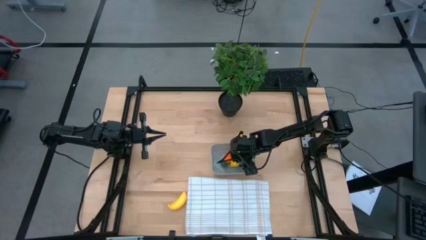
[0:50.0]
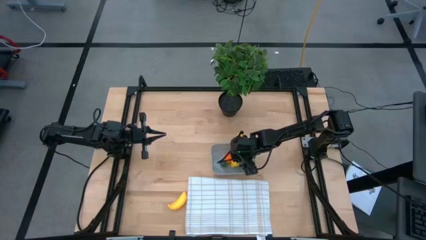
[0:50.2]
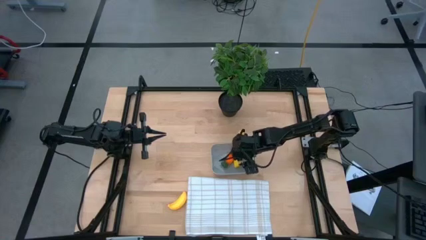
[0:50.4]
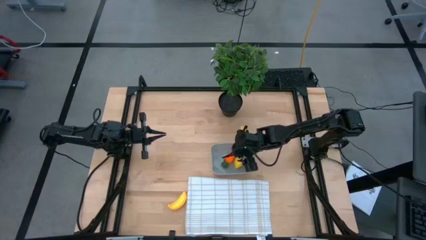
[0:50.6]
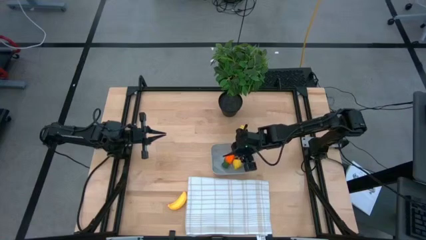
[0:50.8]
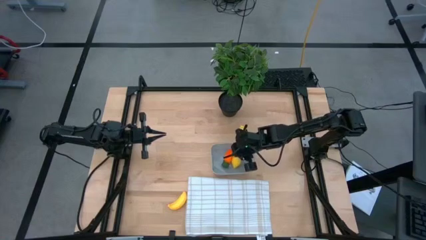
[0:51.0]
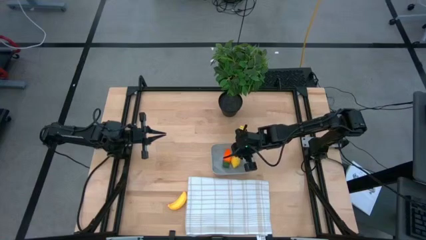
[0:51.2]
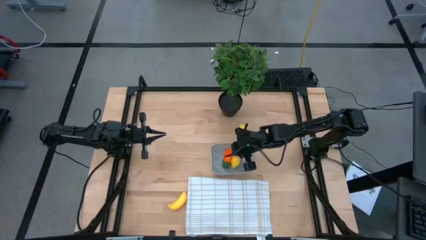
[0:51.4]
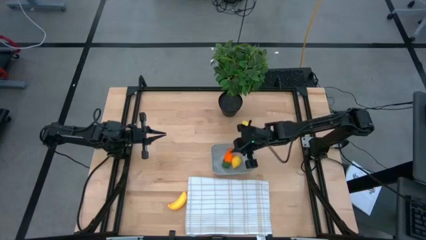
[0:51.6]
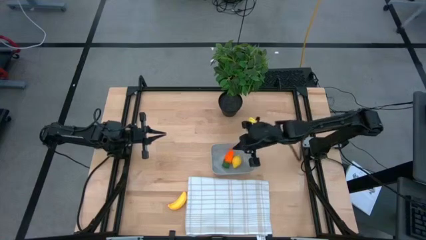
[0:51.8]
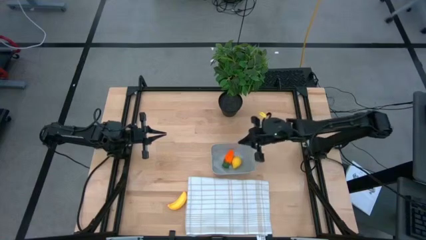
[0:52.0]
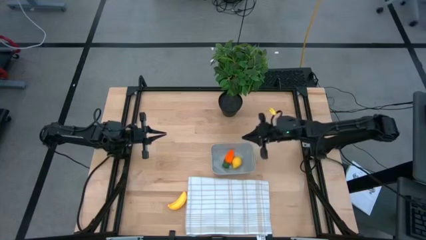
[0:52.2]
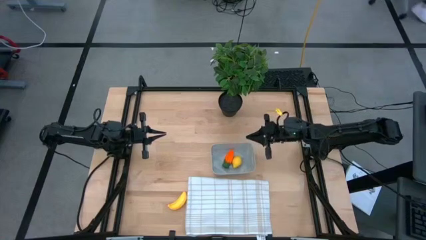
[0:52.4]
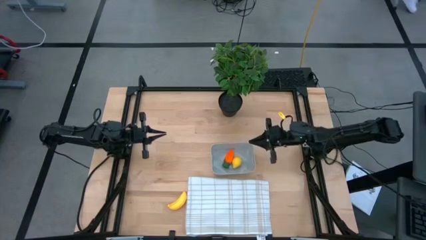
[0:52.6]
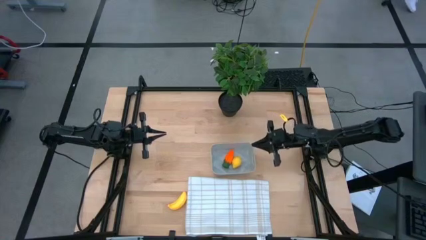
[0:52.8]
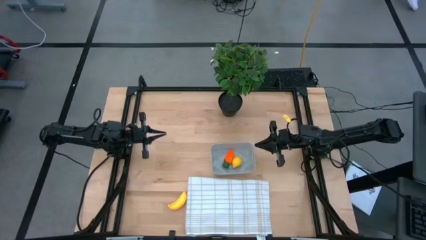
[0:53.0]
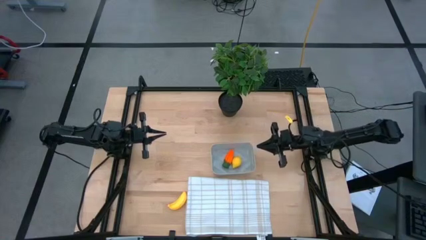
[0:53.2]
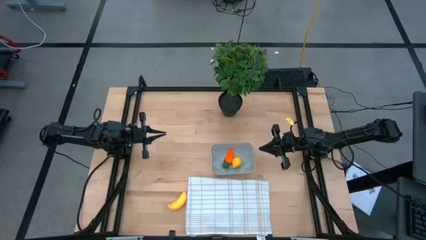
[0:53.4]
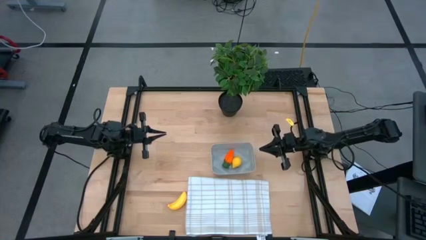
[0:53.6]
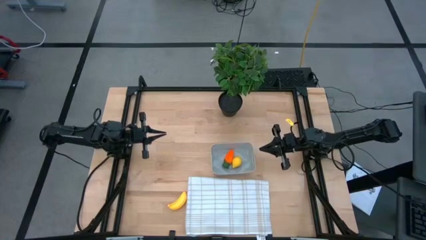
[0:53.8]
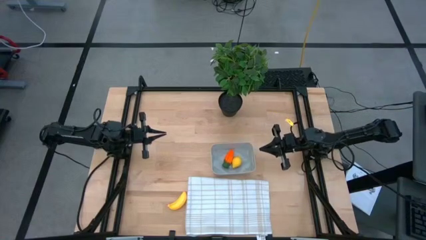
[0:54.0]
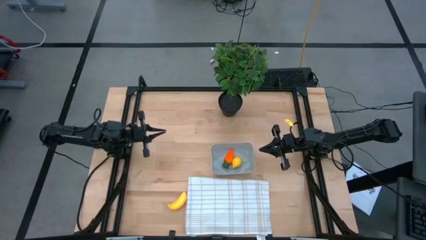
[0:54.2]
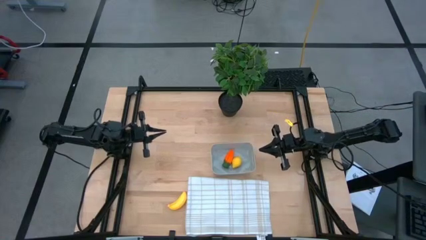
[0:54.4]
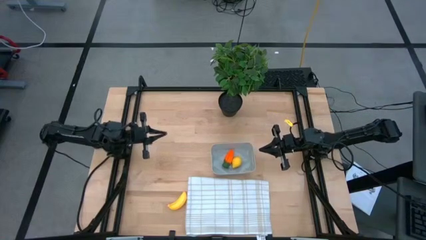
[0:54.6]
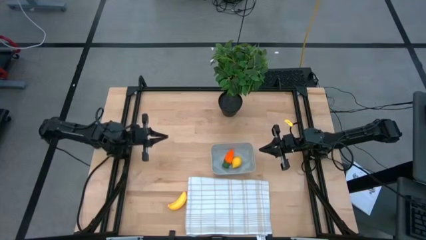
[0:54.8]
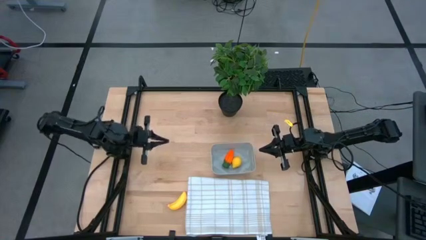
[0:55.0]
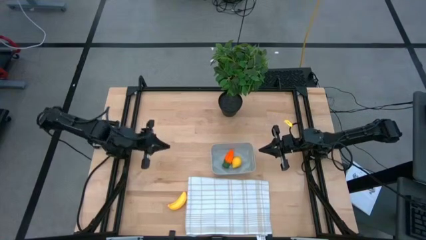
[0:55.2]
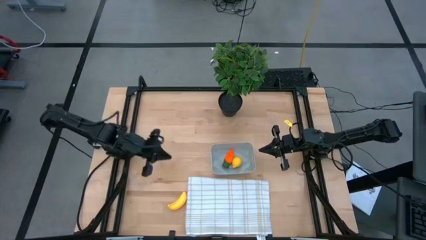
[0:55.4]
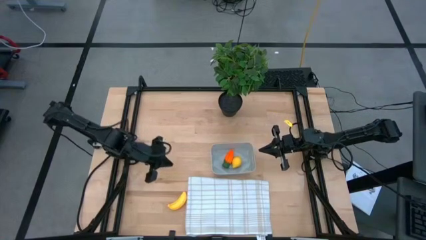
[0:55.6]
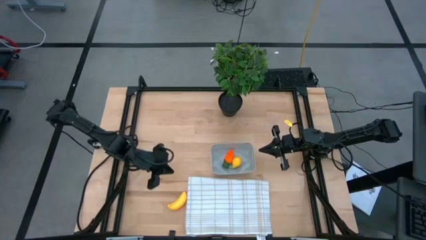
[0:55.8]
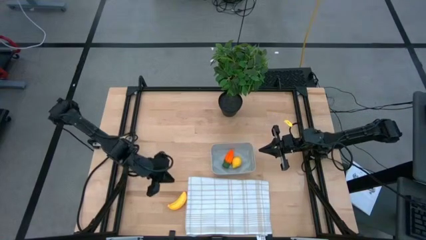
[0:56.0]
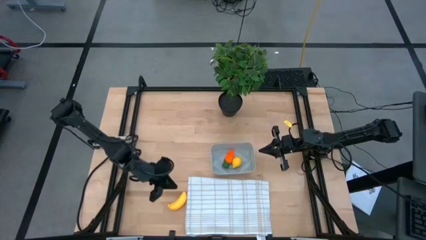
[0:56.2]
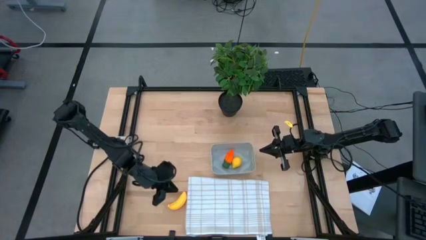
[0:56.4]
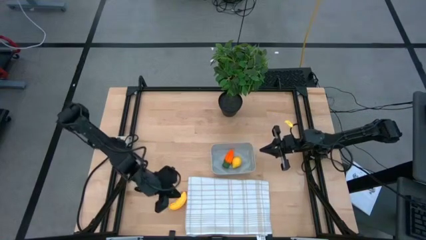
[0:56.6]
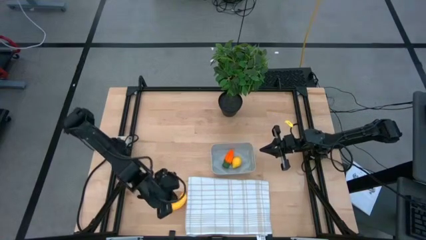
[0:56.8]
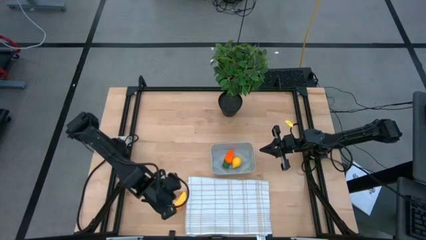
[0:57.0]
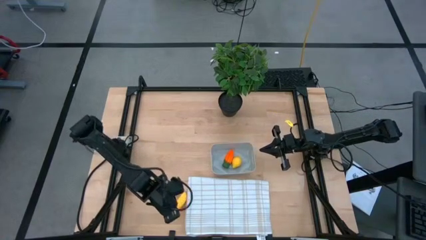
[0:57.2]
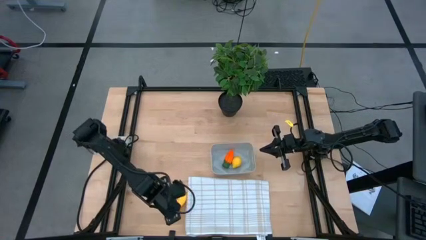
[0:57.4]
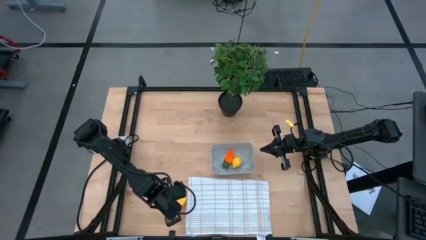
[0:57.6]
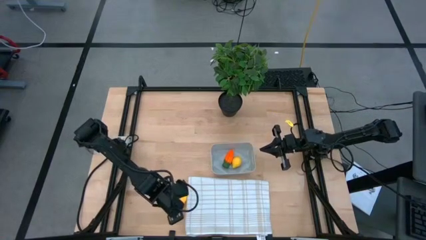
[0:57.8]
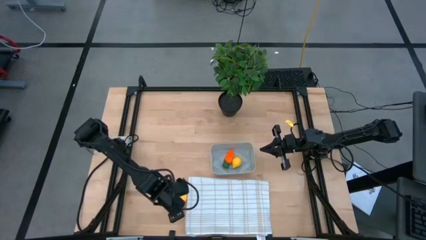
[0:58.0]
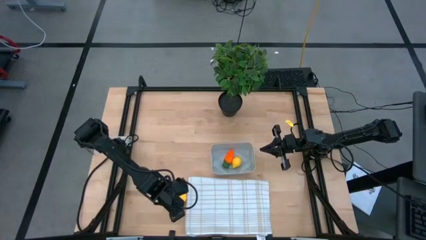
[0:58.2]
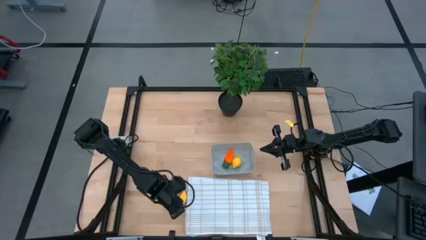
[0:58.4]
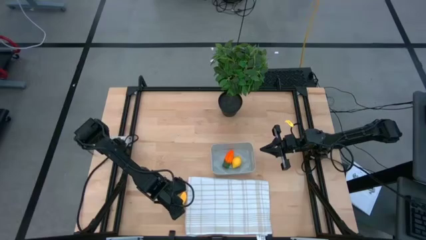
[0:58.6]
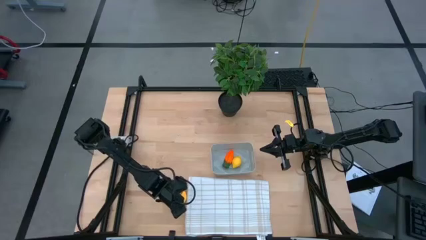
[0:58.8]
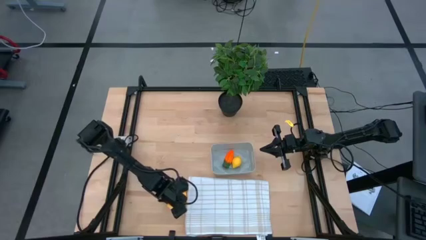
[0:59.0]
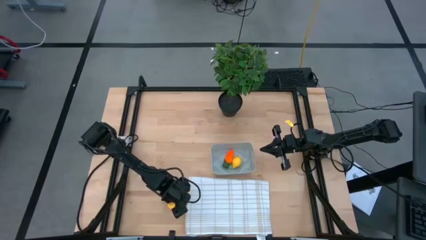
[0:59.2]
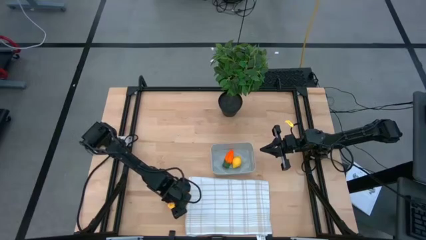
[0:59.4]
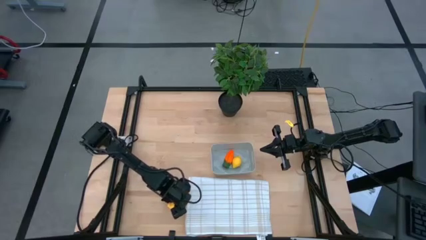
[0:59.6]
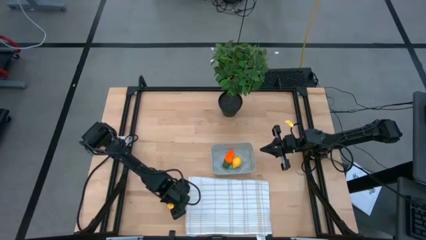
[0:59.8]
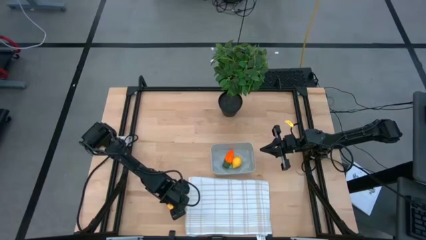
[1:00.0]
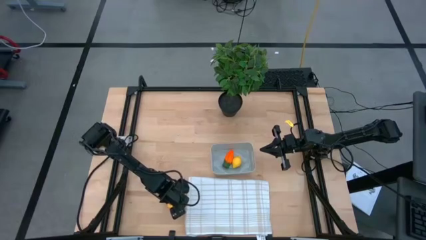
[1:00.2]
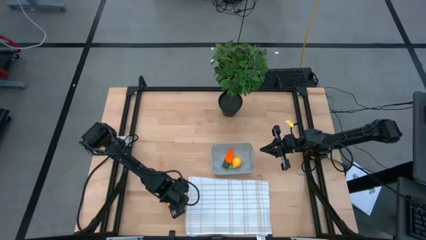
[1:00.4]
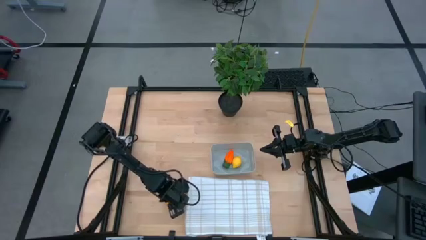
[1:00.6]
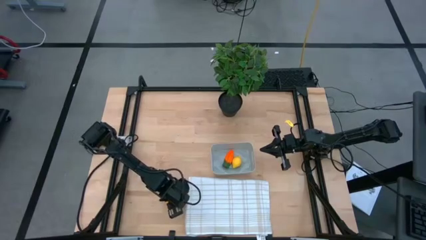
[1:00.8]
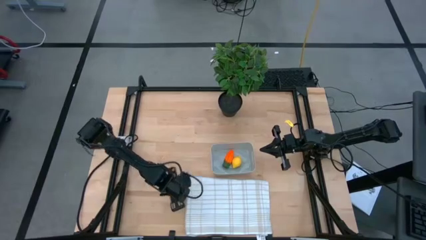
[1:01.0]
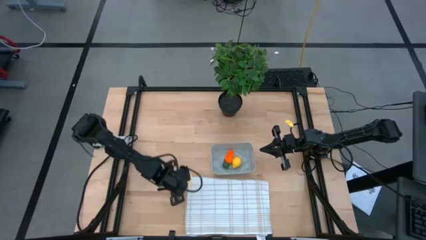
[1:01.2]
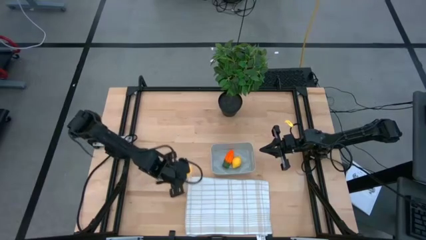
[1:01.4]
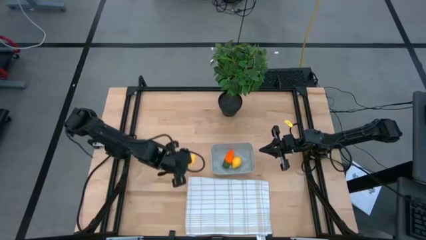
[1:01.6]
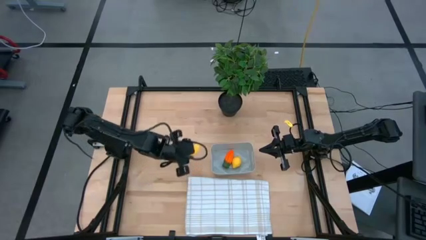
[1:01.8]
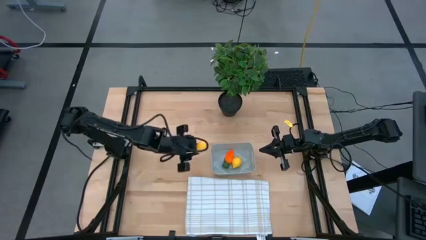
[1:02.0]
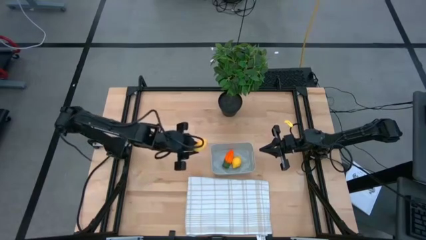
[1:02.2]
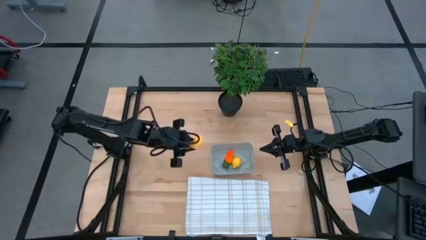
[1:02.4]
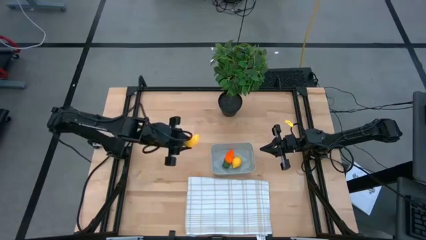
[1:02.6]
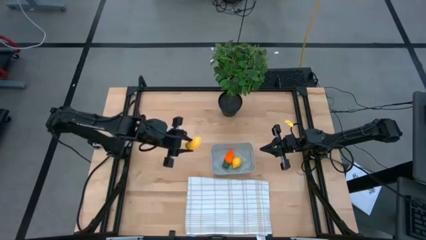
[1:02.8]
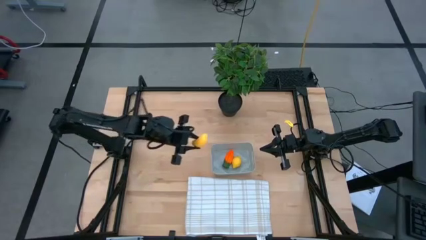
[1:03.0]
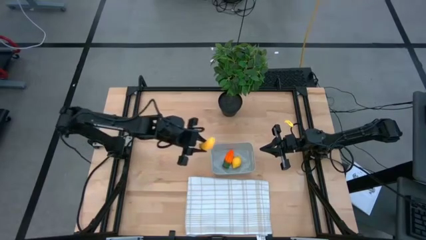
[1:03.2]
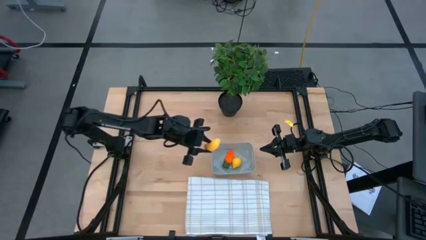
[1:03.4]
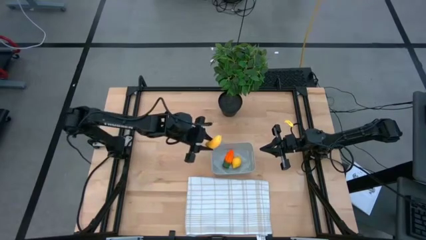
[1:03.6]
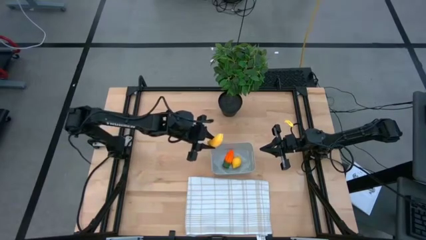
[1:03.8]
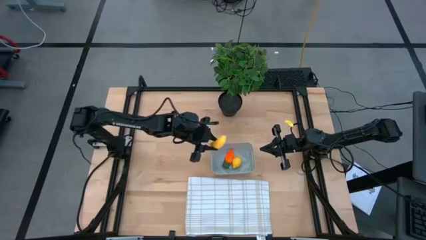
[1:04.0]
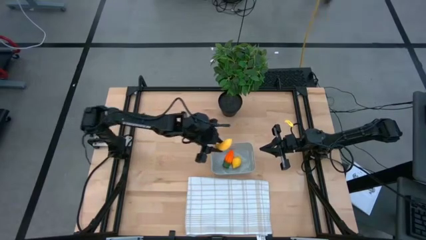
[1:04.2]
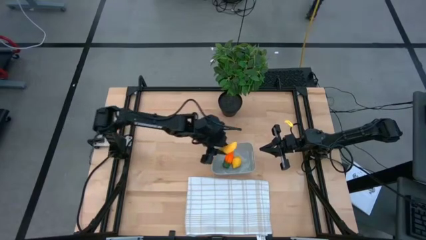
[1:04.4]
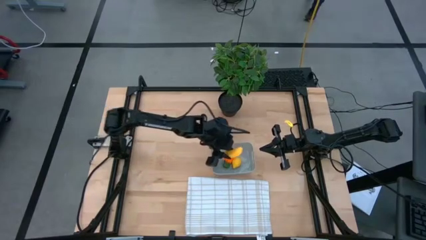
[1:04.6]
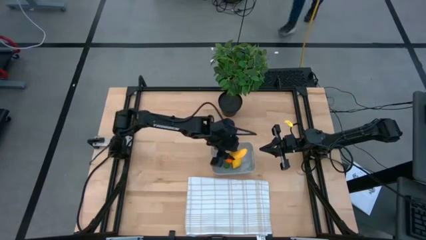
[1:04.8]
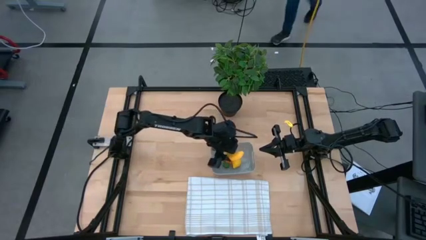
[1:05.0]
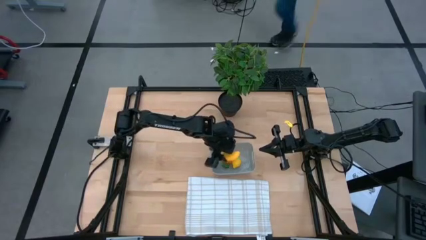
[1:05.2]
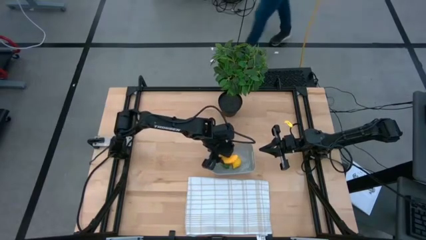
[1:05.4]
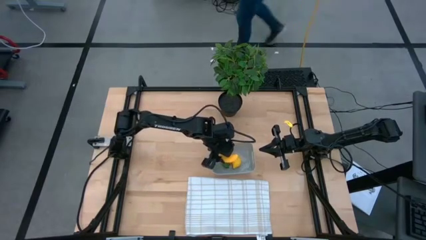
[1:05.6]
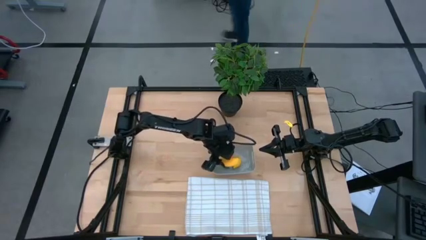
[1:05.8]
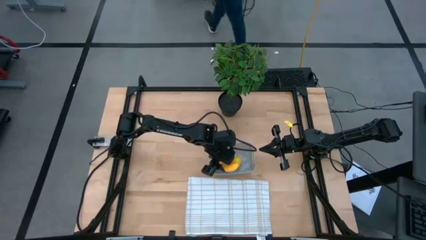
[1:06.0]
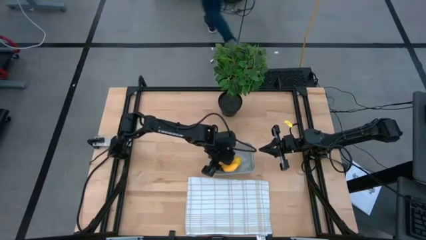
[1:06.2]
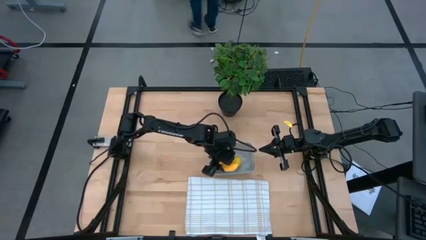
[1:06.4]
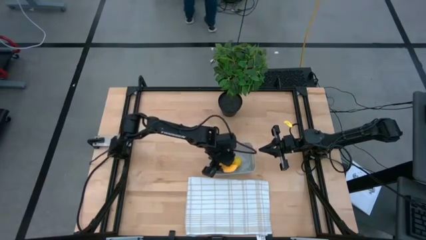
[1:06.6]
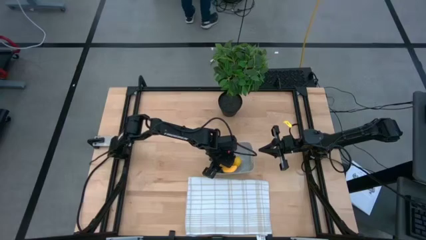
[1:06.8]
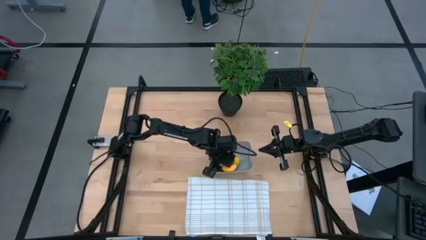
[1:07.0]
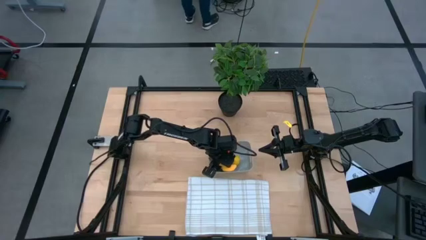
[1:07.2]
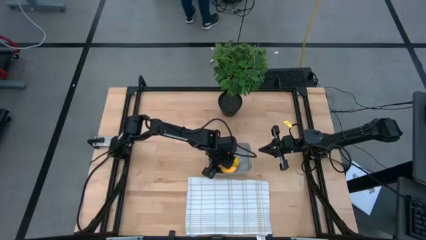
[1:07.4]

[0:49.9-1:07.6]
Task: Pick and placing Produce into tupperware
Put the banana into the bin
